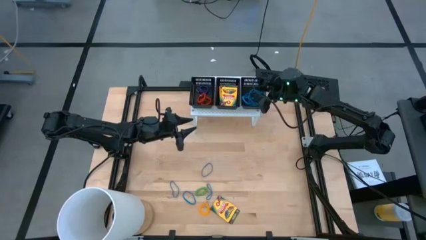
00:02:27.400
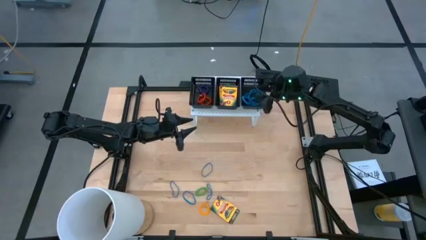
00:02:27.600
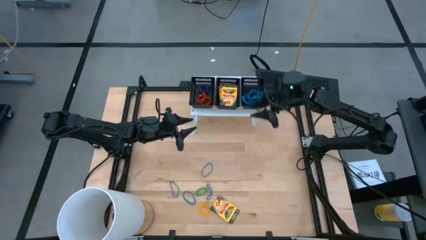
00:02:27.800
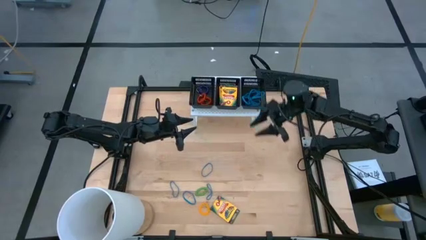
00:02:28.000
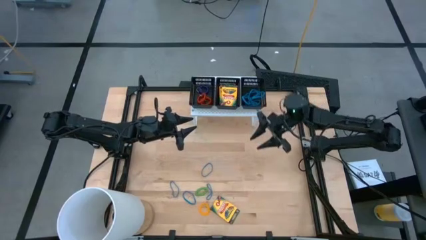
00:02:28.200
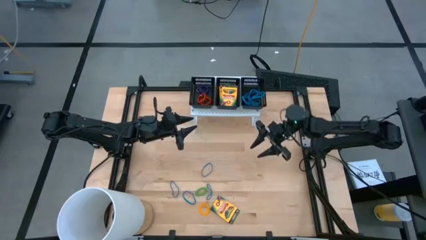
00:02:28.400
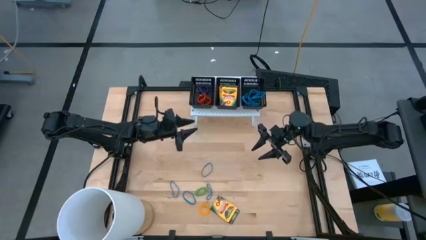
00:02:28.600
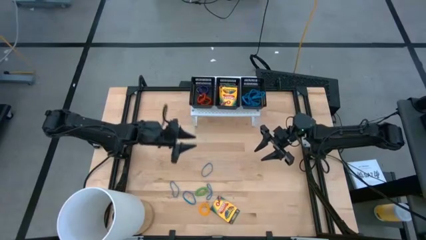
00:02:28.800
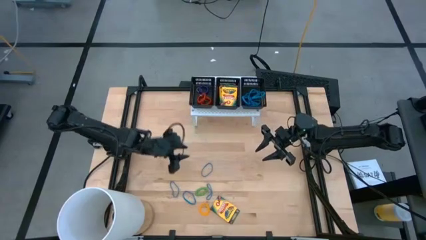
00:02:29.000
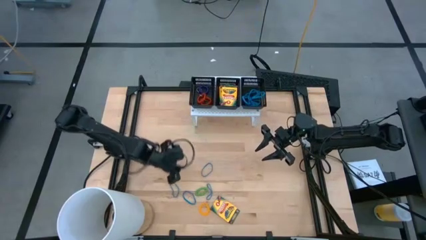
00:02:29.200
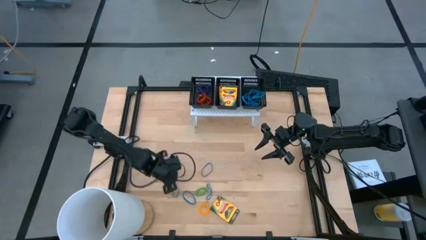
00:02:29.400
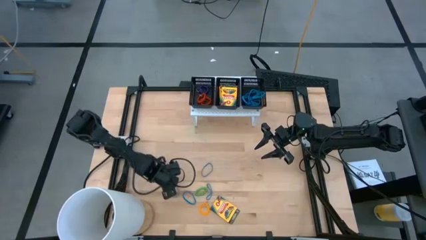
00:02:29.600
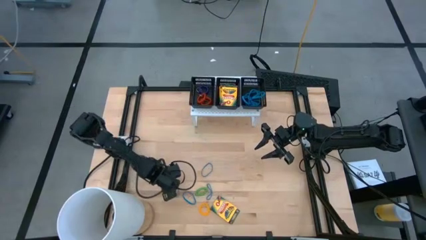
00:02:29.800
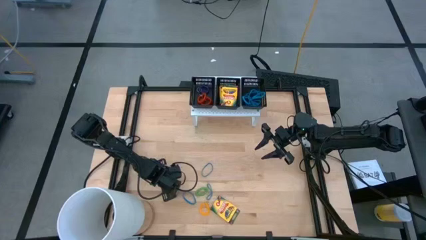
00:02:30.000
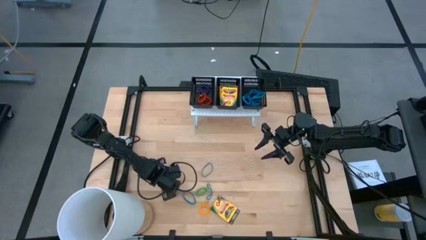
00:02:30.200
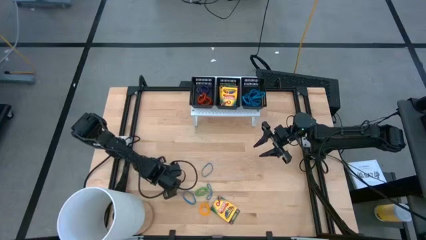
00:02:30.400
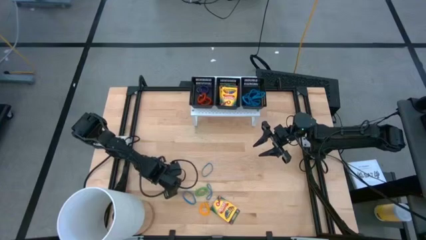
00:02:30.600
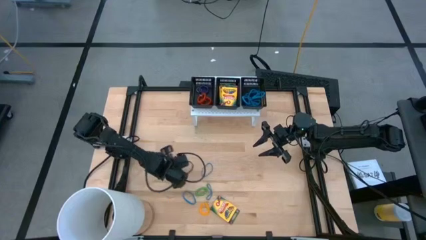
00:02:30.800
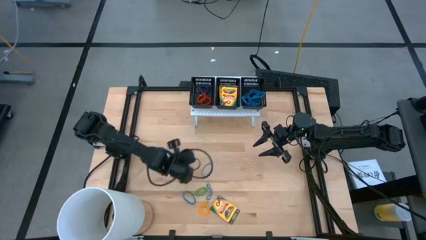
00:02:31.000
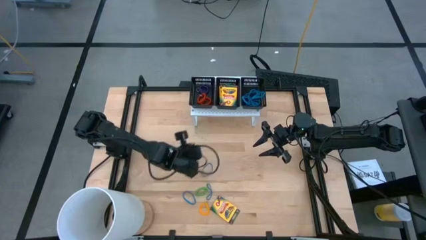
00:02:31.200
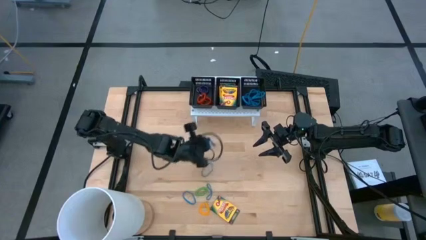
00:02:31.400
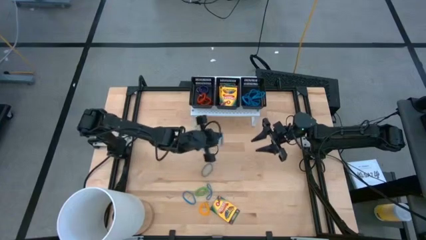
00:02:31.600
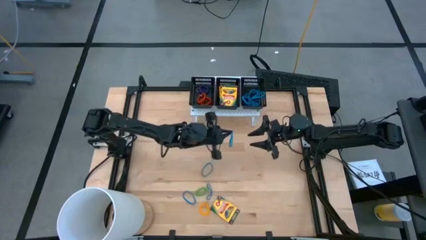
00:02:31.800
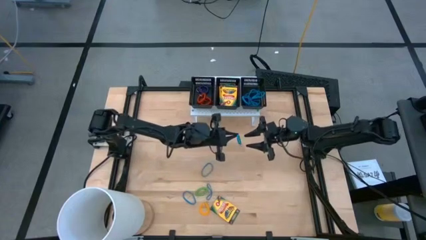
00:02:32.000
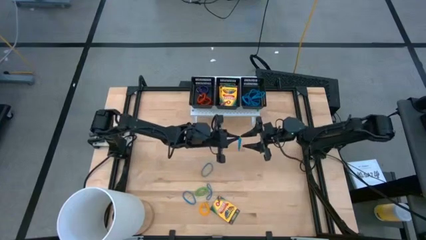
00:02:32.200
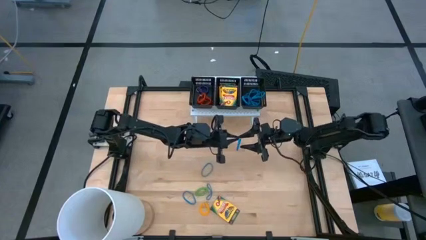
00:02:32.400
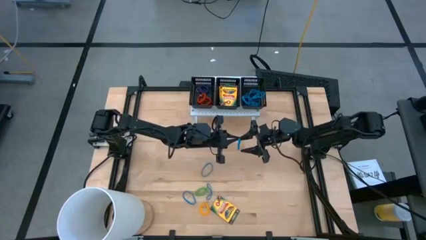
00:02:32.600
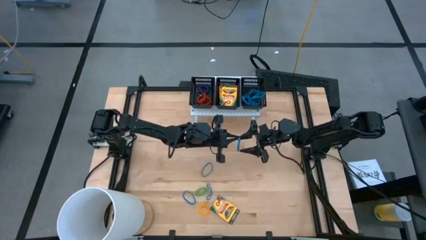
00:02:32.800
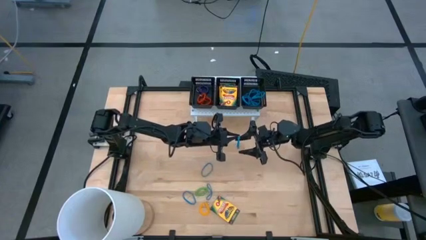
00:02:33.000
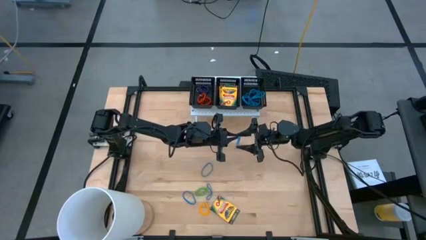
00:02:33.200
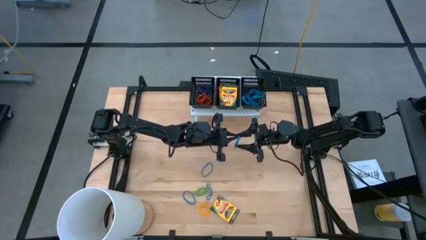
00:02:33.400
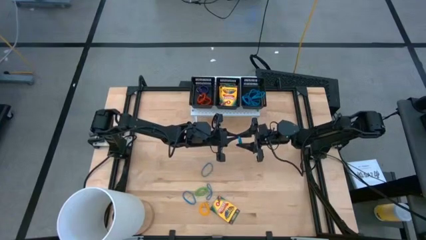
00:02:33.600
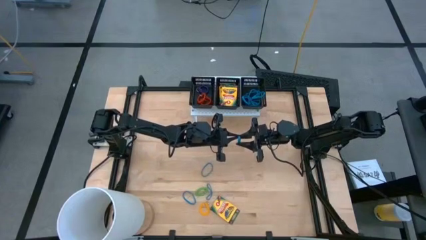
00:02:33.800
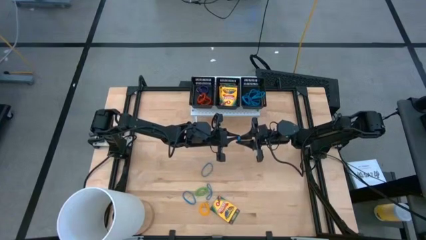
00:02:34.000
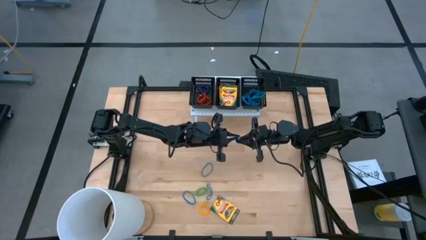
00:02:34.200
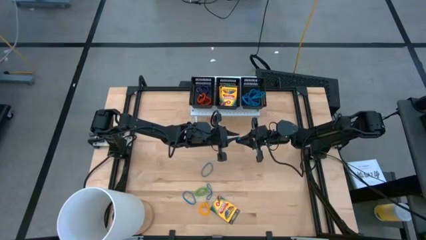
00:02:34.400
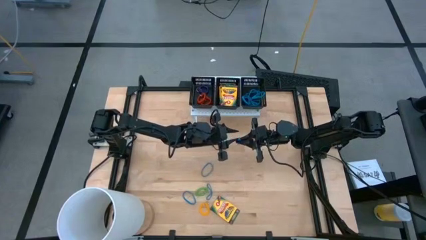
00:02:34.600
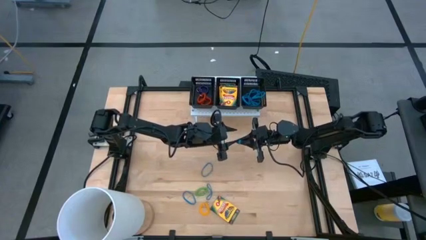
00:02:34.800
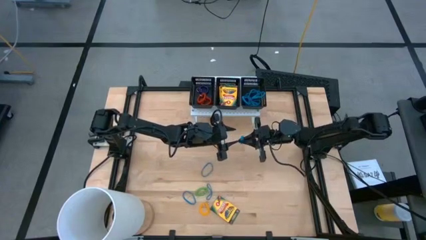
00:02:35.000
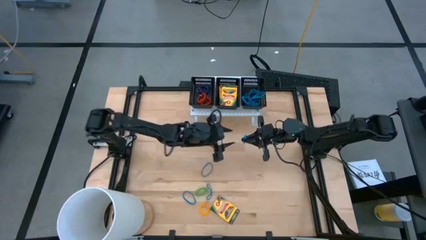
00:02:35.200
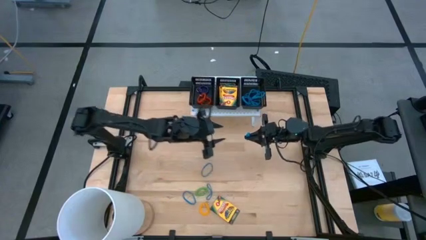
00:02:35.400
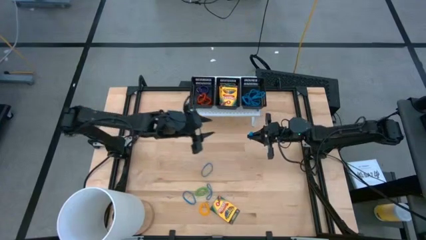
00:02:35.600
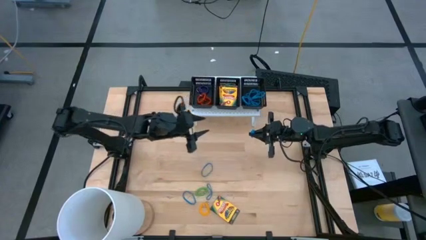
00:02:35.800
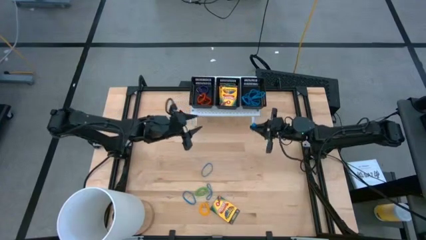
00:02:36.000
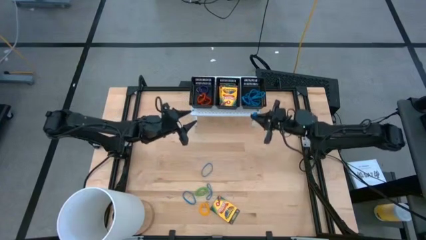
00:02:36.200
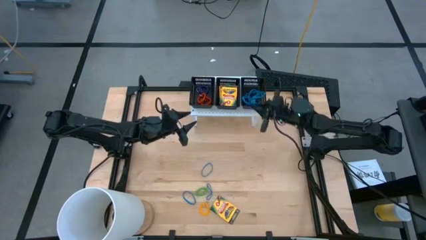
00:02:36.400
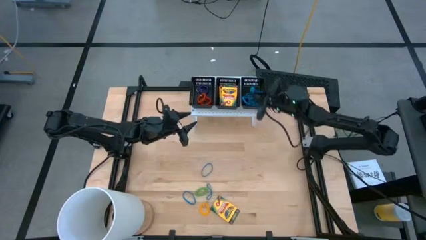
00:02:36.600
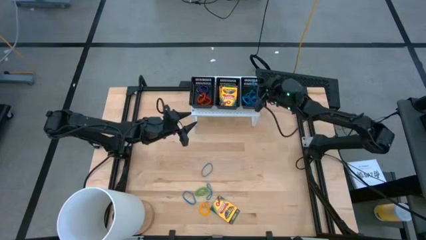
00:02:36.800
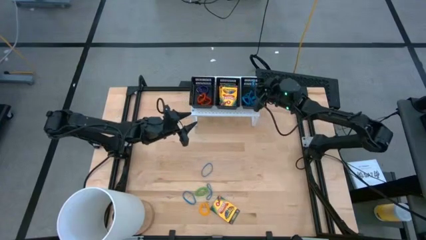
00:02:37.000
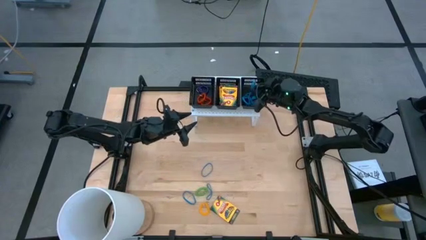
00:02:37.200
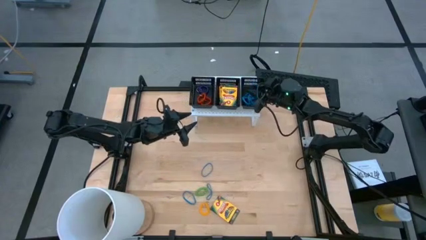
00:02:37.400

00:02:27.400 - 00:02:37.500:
Task: Pick & Place Office Desk Supplies
Put the blue rubber band into the right black bin on the shelf

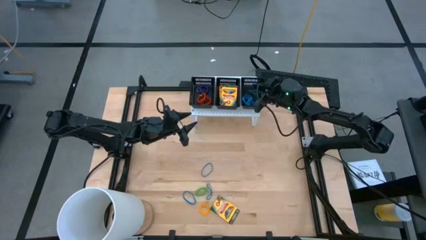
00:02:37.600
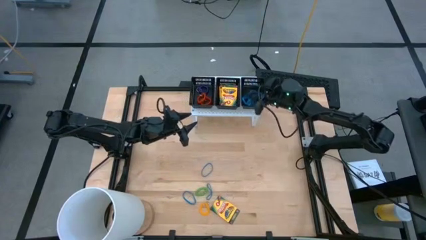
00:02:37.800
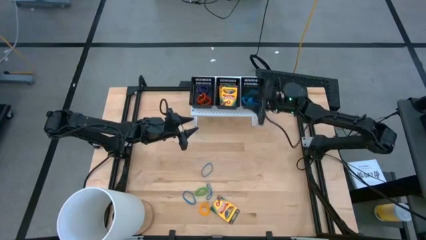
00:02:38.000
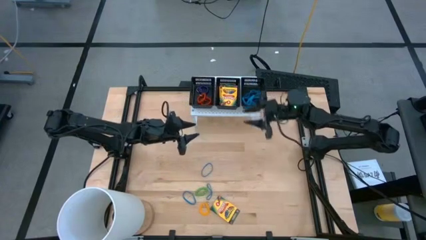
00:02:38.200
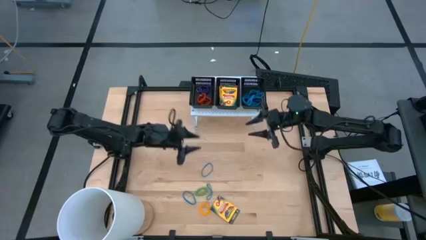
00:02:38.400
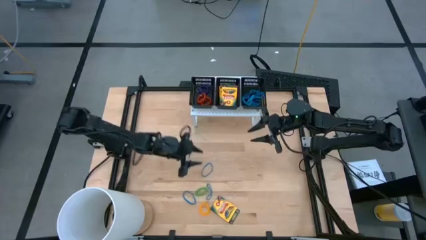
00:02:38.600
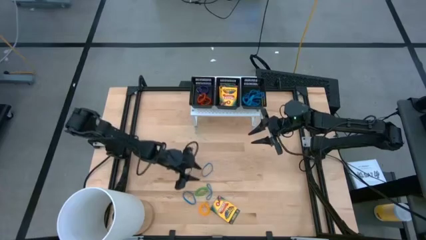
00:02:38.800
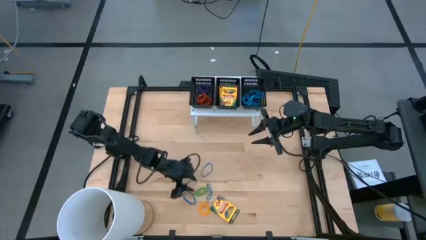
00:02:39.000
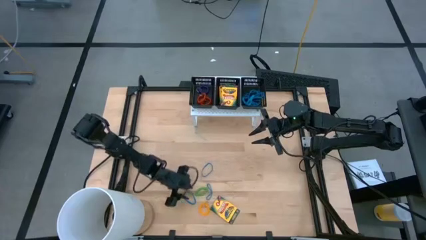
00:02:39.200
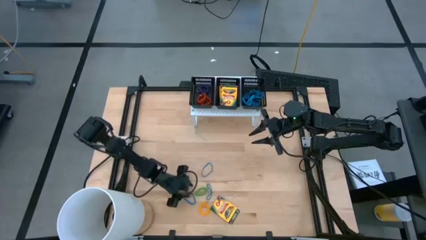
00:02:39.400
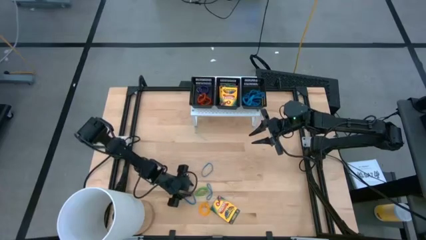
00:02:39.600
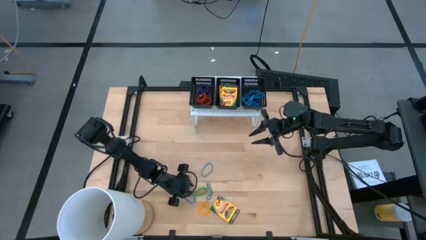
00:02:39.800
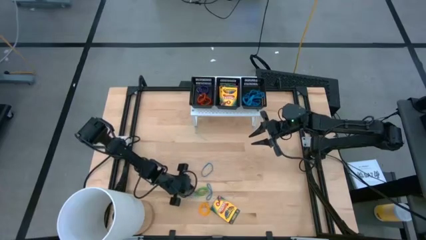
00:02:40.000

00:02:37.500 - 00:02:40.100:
Put the blue rubber band into the right black bin on the shelf

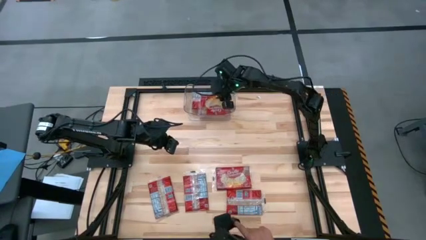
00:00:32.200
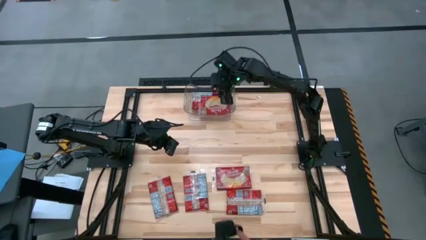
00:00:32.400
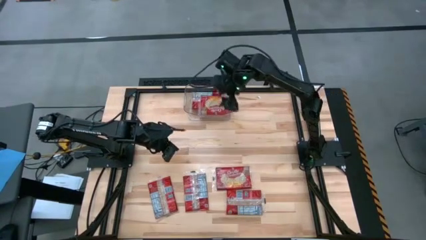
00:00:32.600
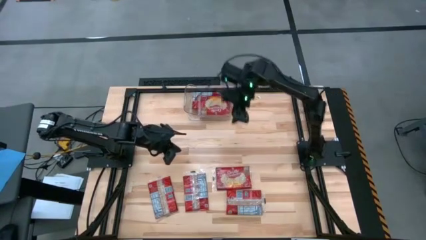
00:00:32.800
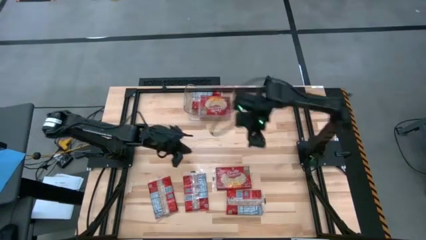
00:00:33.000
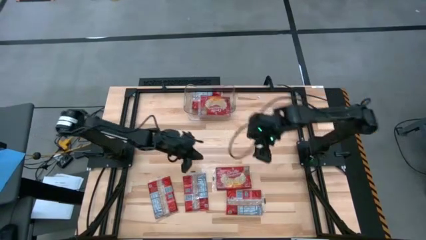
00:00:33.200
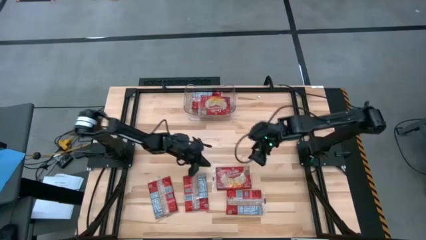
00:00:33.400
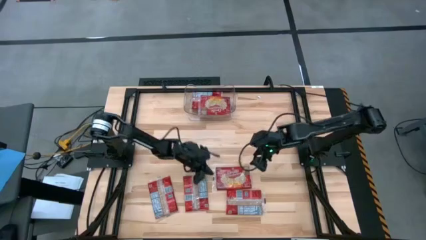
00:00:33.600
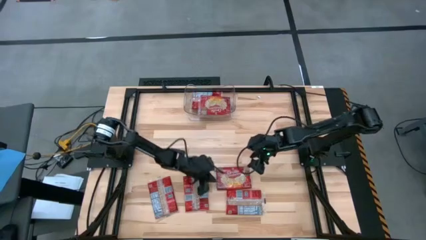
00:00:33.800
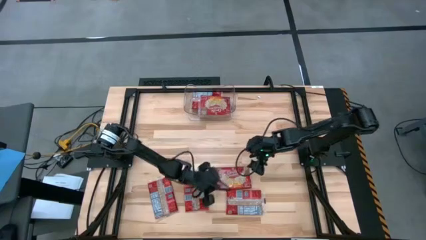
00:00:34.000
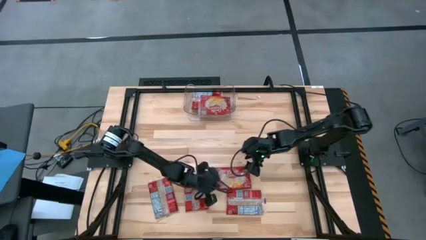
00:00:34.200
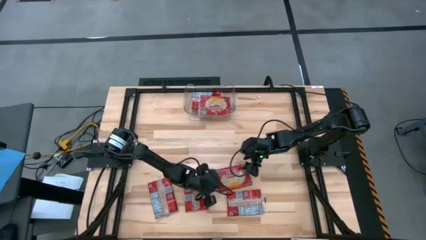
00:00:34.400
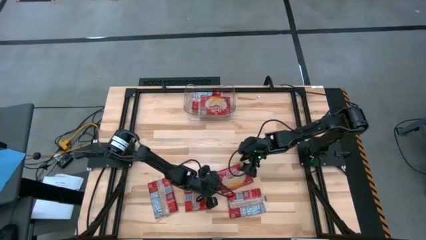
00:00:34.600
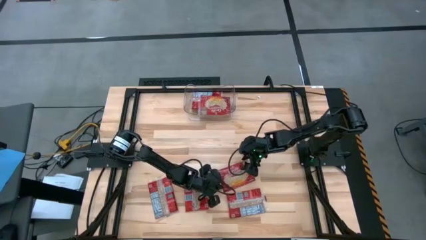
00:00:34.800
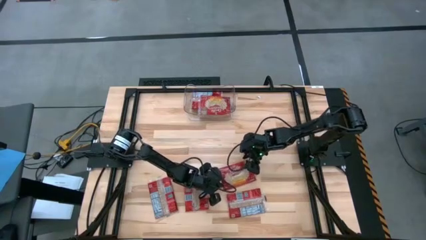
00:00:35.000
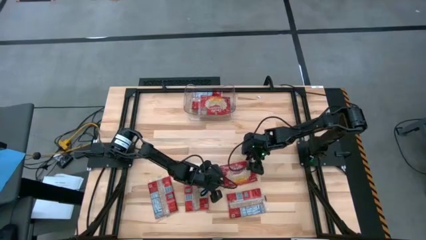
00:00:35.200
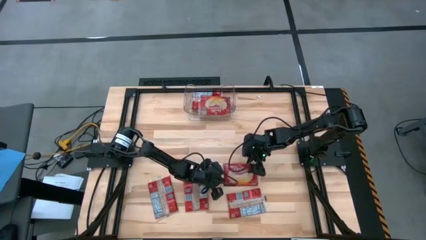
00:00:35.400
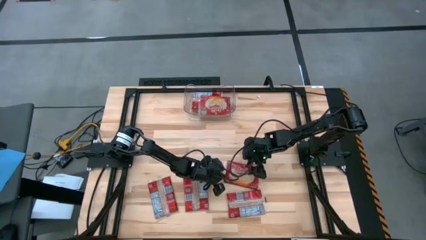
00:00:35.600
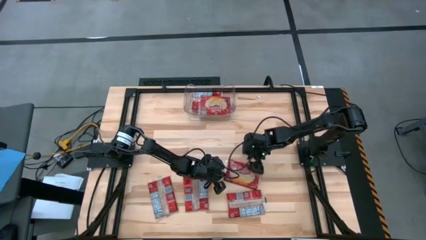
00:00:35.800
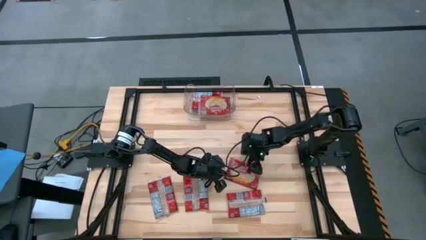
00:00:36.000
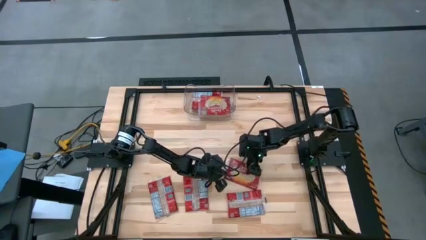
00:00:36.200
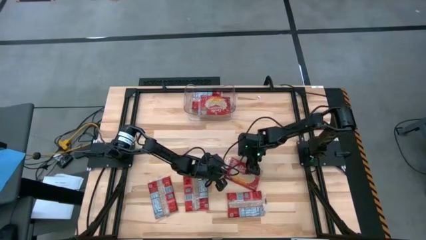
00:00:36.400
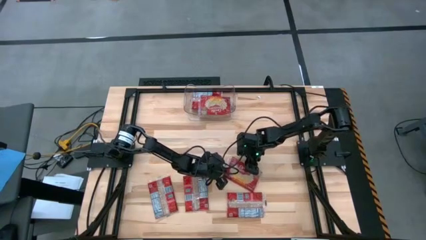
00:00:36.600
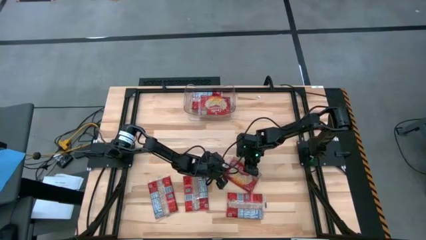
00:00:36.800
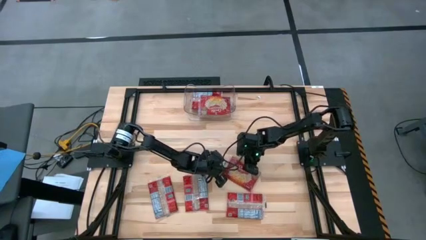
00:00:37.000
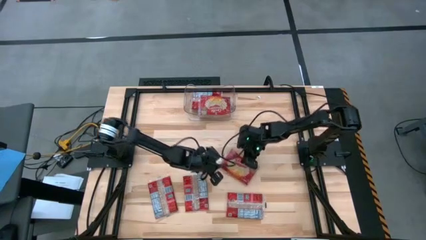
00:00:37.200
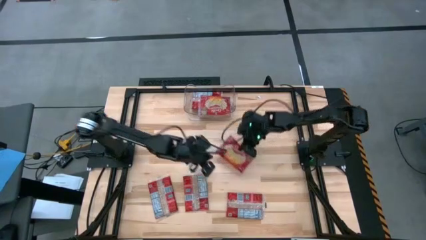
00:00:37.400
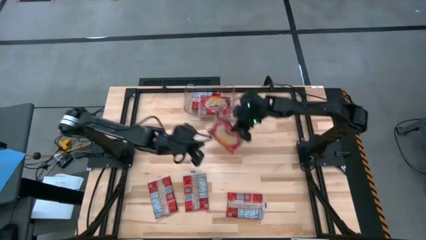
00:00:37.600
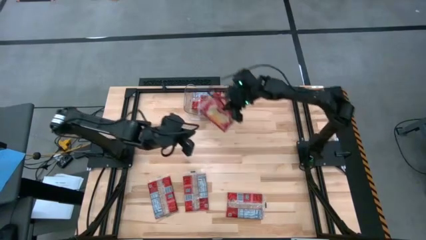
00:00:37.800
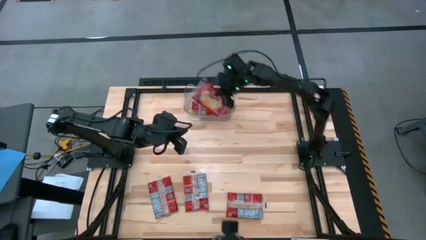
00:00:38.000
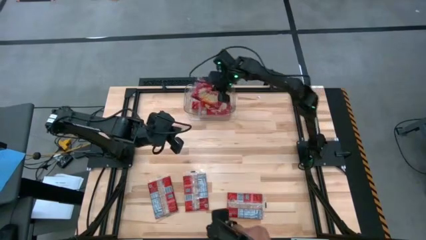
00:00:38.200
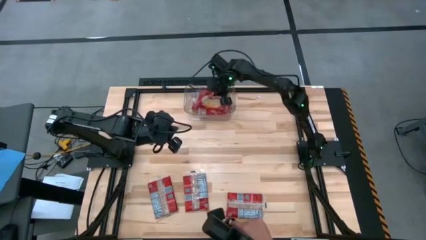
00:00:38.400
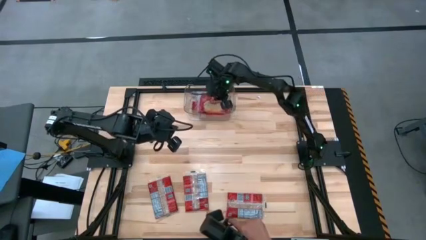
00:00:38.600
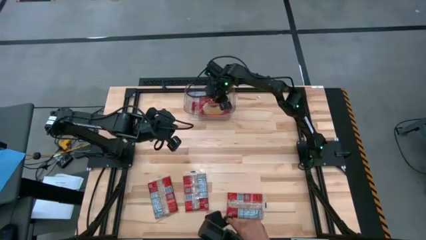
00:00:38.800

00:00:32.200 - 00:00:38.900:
Task: Sort popcorn bags into baskets
Put the red popcorn pack into the transparent bin
